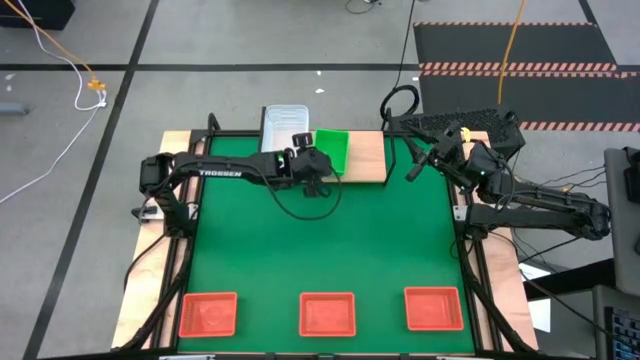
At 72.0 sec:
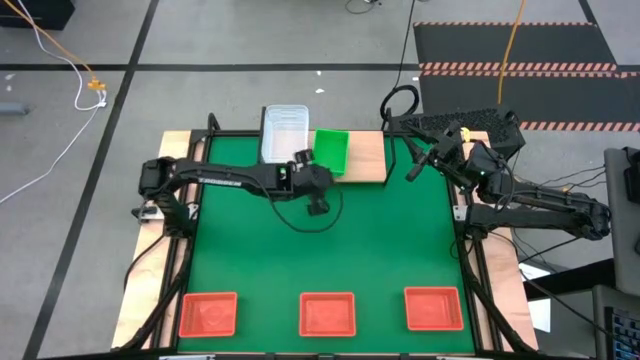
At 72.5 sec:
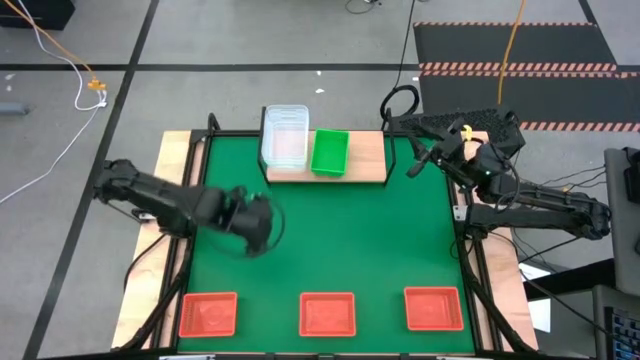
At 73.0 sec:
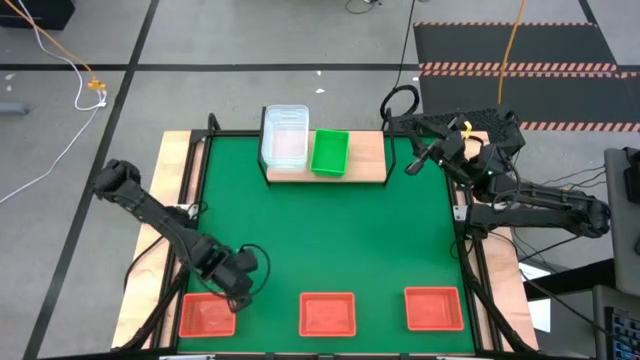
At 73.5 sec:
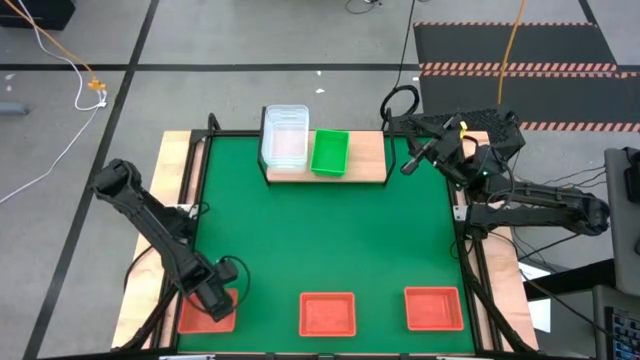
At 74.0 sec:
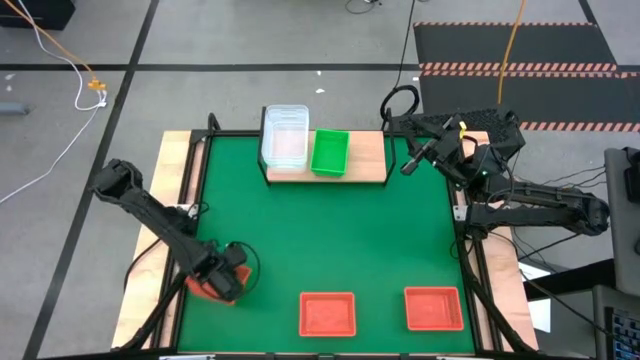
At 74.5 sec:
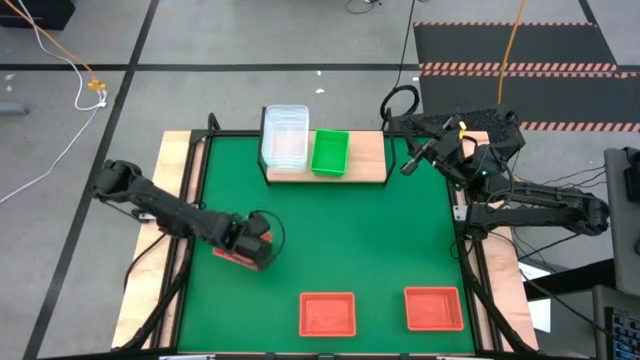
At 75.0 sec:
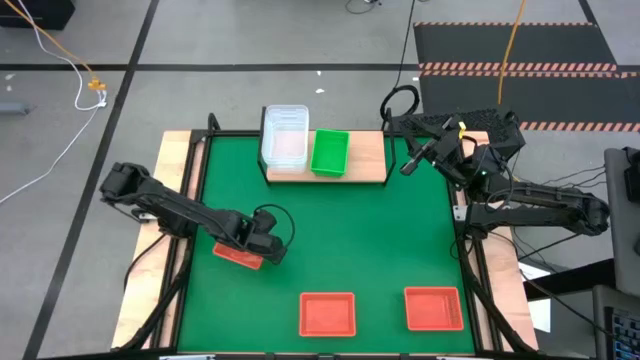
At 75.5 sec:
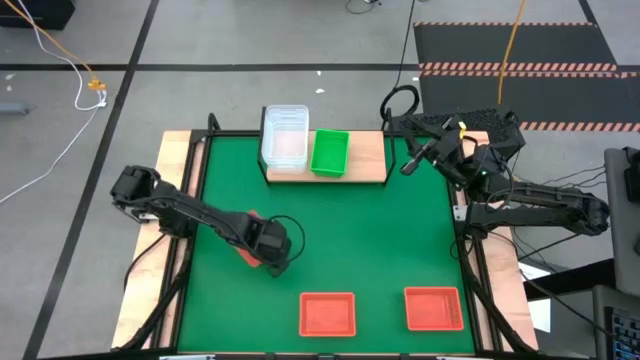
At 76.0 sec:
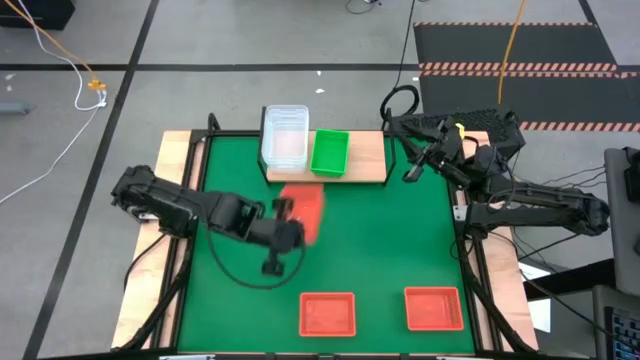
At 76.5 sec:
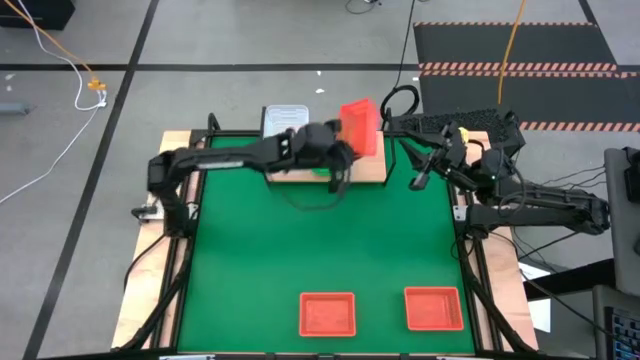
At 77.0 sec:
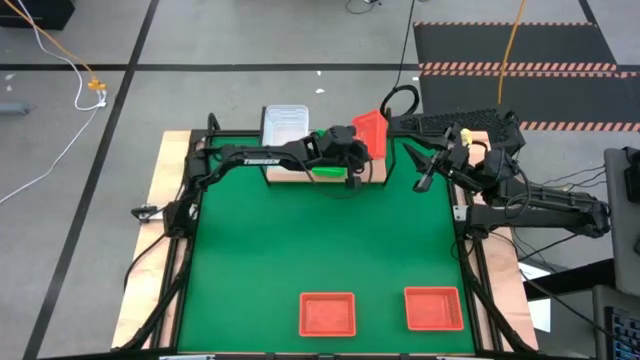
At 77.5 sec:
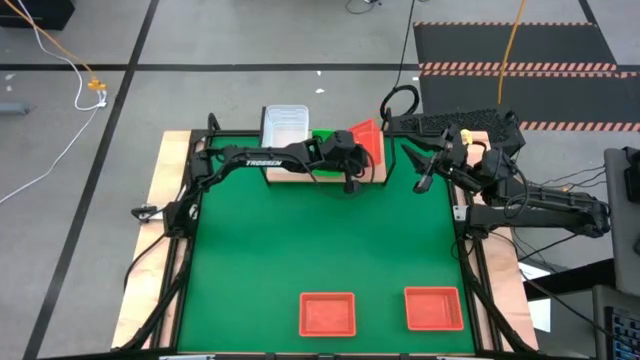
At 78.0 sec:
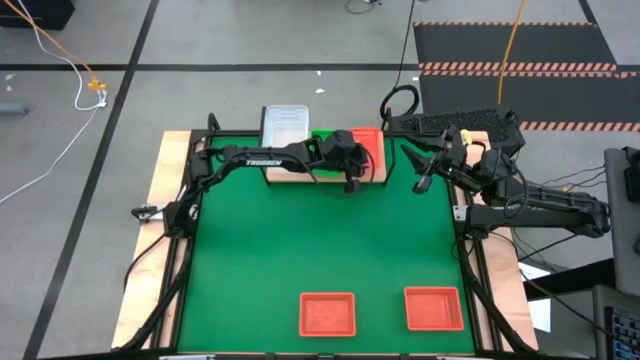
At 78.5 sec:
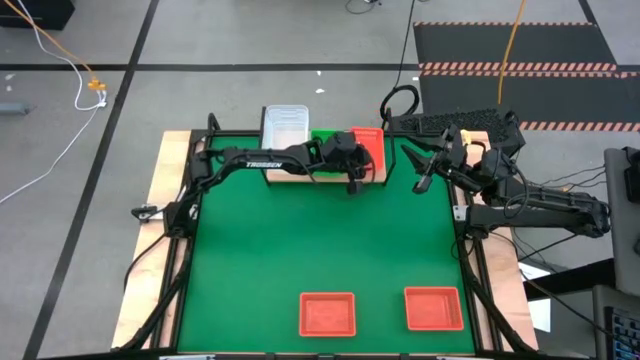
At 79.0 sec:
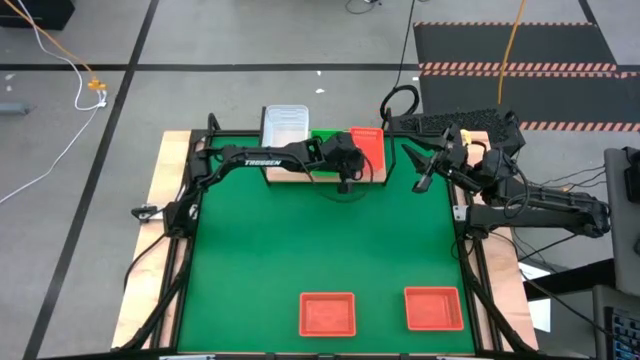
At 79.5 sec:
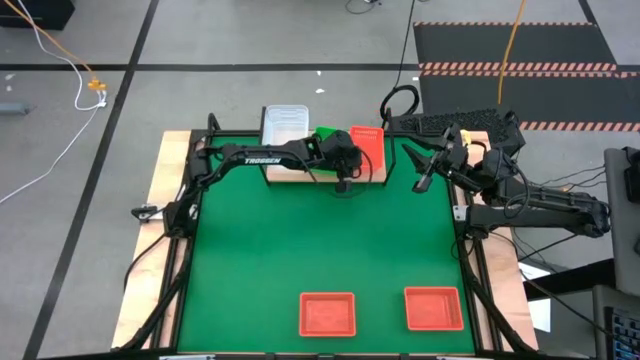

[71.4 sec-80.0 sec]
Task: Stack baskets on shelf by color
Put the left orange bin on the shelf

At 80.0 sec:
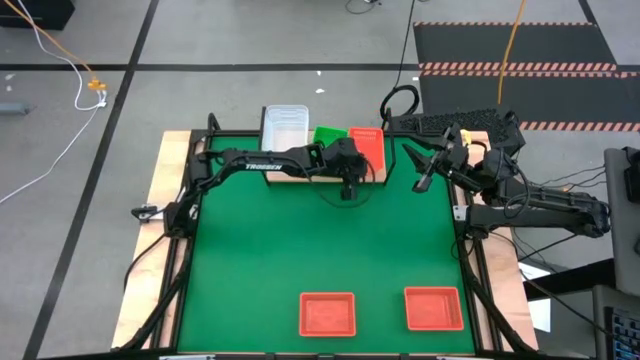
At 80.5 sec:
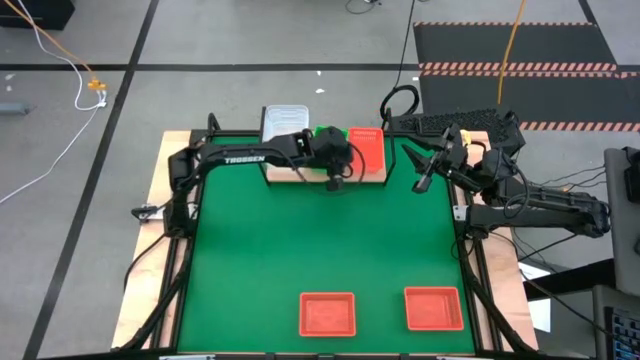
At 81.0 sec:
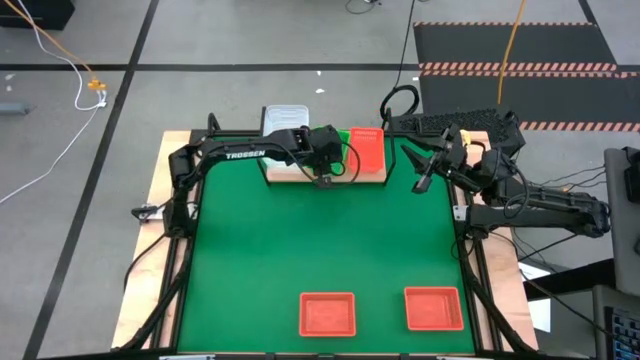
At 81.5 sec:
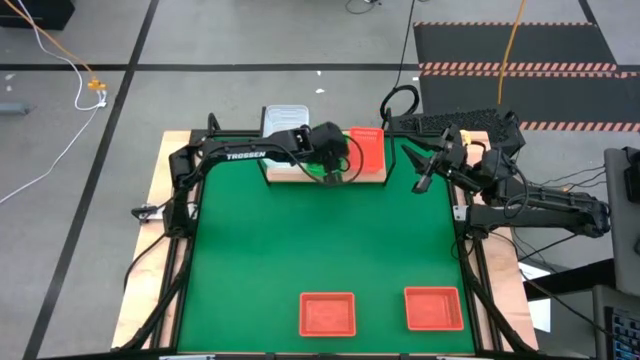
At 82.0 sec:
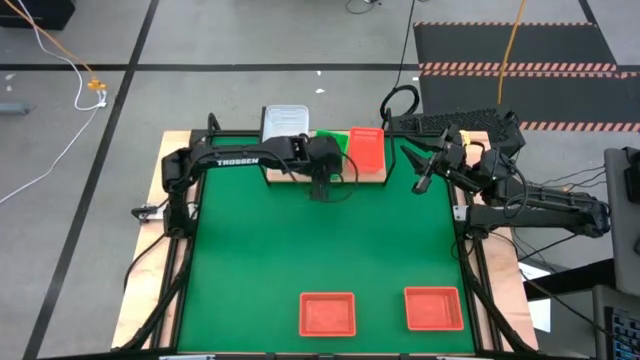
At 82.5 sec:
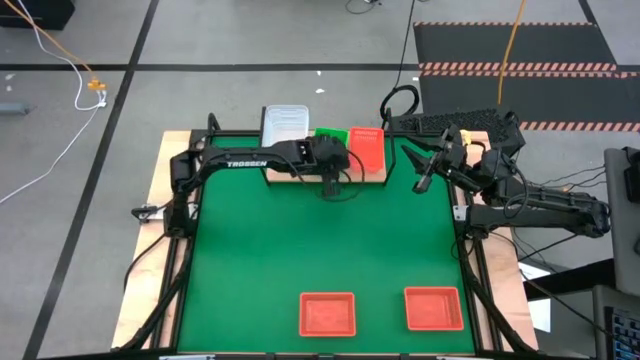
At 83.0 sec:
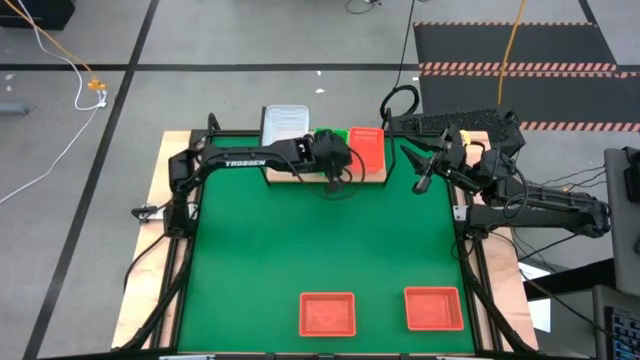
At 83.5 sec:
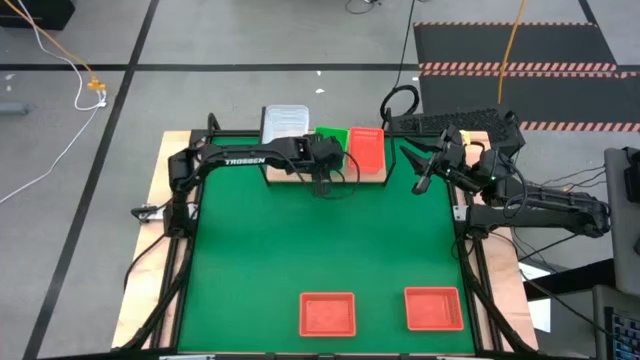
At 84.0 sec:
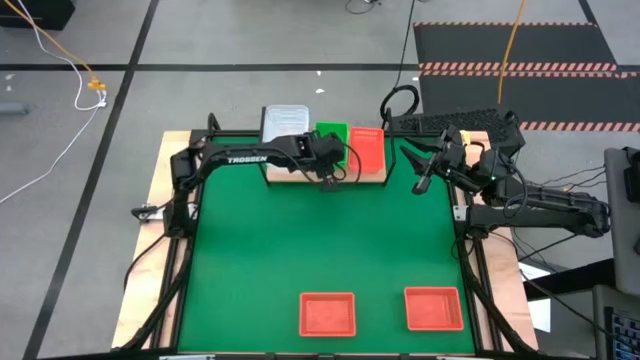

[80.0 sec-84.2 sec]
Adjust the stacked green bins on the shelf

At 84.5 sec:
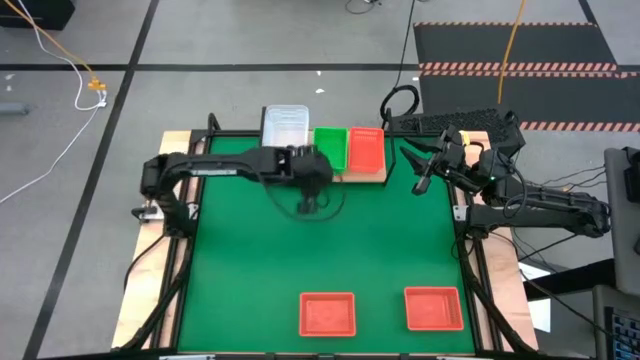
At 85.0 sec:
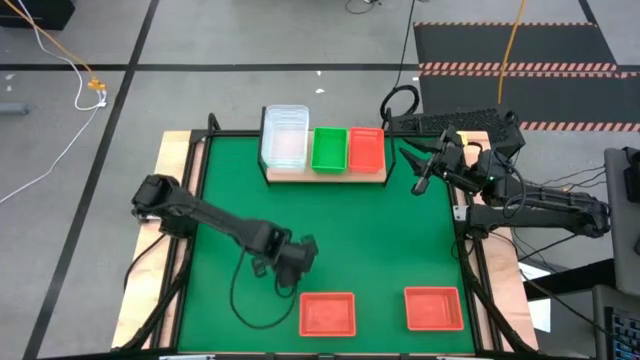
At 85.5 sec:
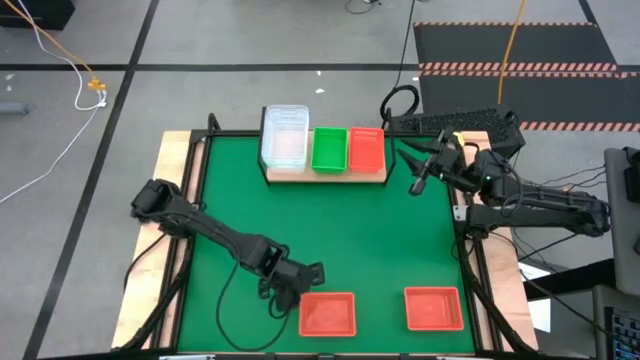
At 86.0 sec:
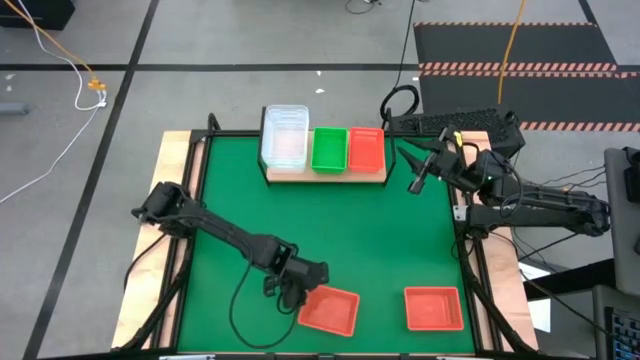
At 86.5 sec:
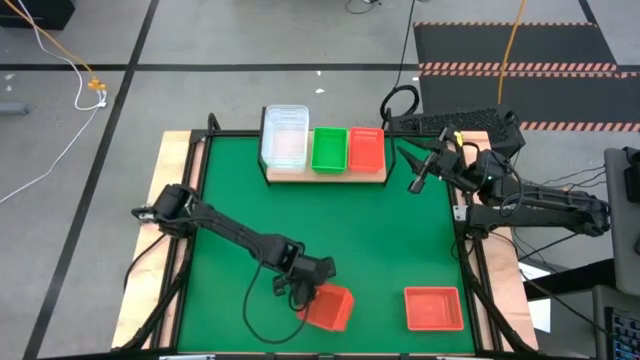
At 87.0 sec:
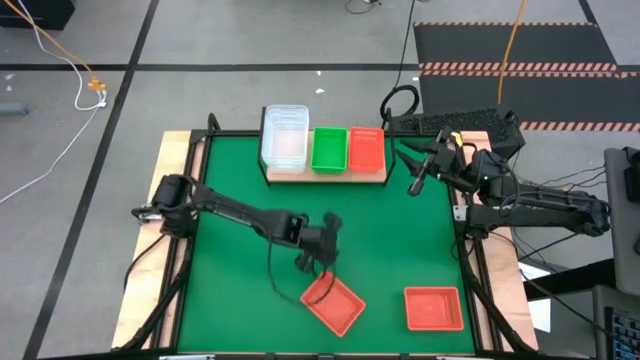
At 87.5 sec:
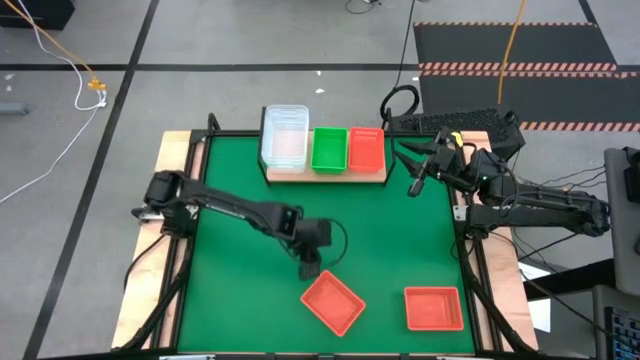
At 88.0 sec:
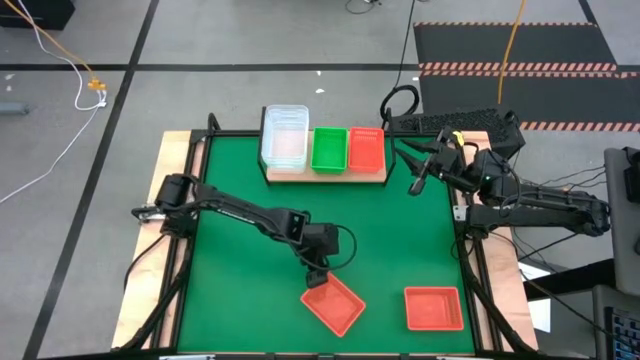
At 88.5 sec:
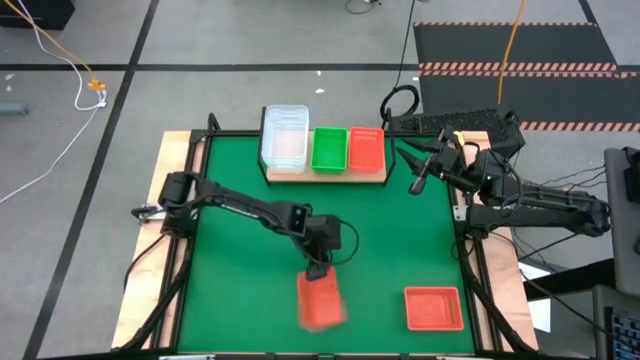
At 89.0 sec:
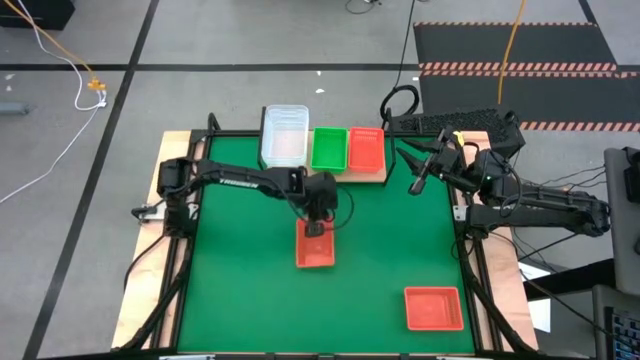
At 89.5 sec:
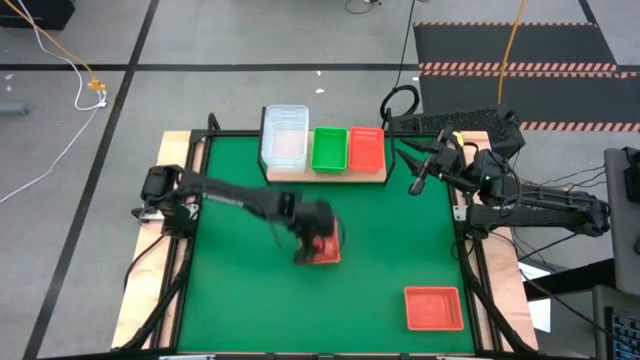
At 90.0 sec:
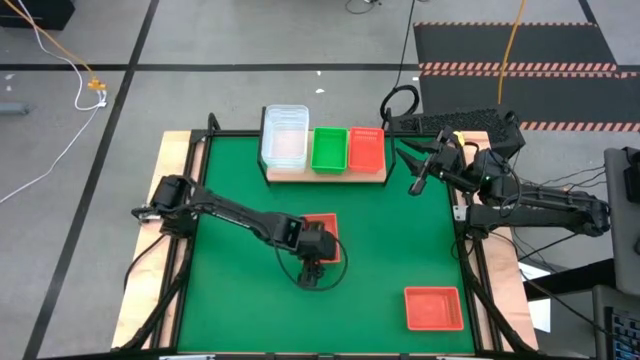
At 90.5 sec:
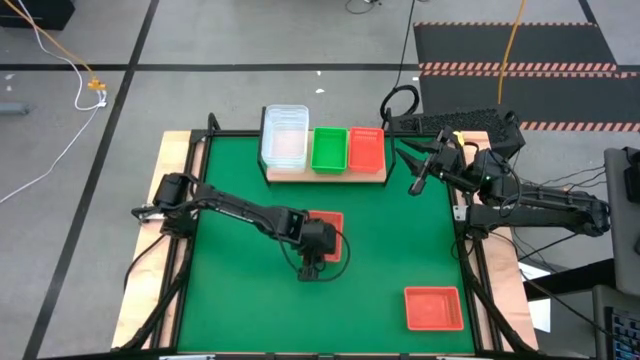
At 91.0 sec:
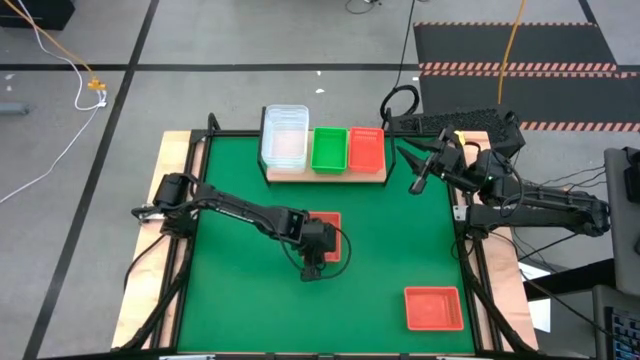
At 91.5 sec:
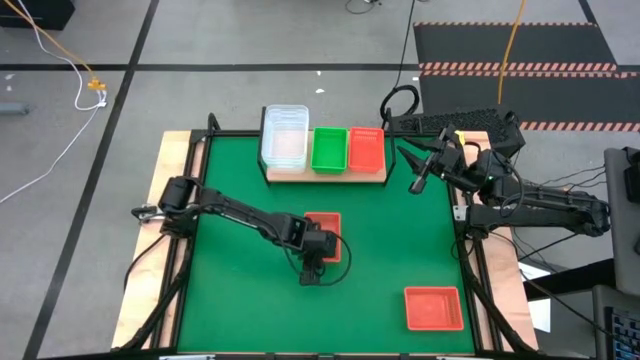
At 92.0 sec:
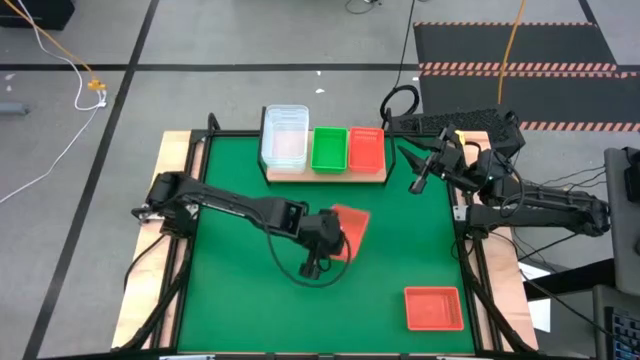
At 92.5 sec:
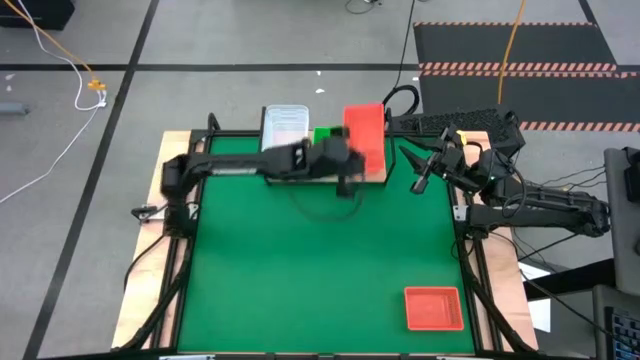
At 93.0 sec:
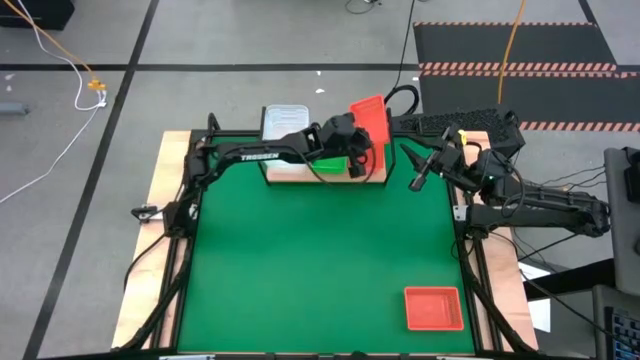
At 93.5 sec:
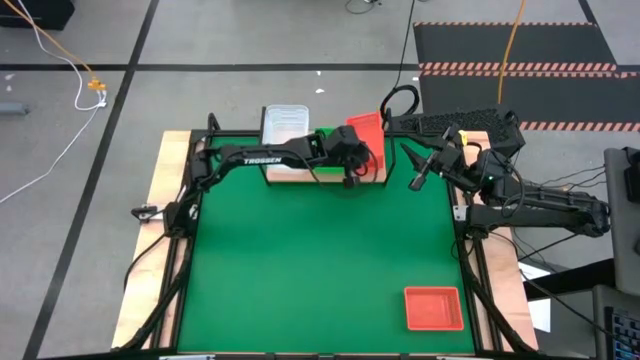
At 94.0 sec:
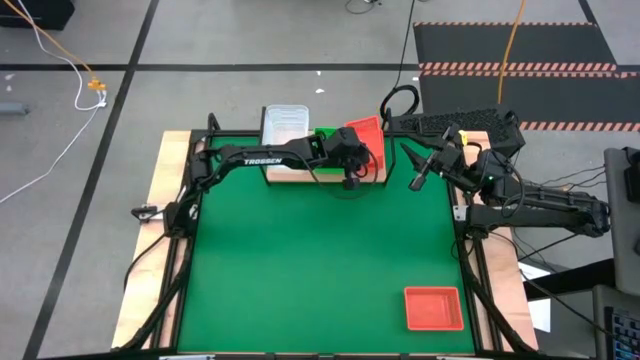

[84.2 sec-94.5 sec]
Stack the left orange bin on the top of the other orange bin on the shelf
